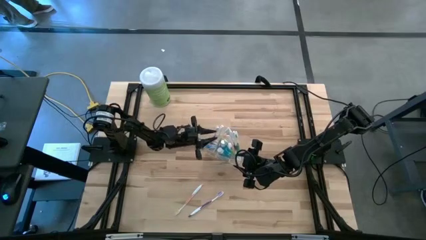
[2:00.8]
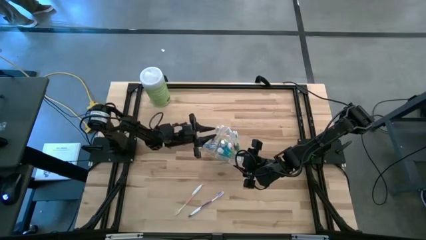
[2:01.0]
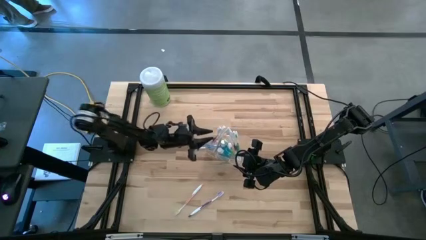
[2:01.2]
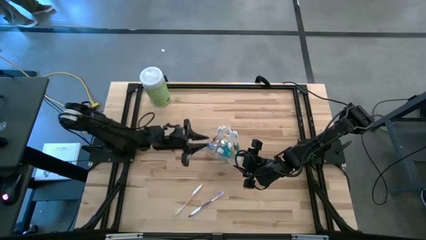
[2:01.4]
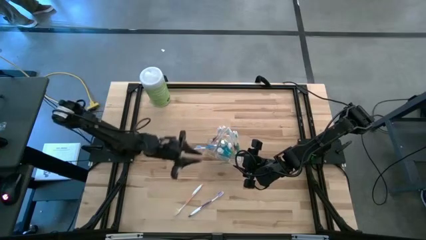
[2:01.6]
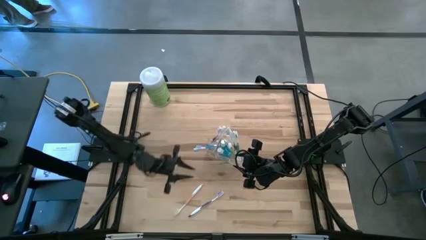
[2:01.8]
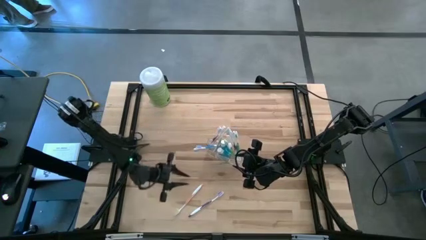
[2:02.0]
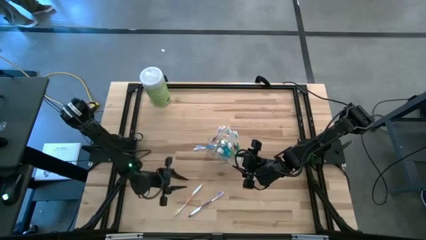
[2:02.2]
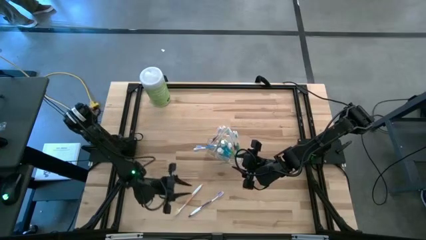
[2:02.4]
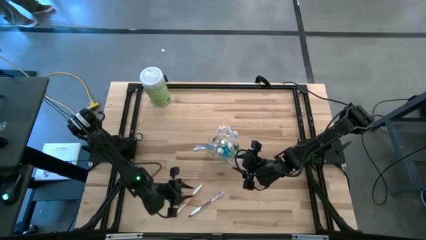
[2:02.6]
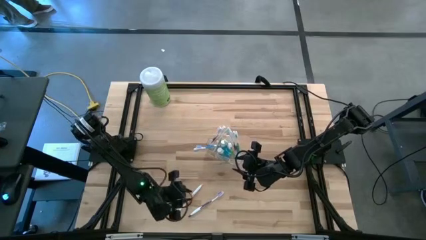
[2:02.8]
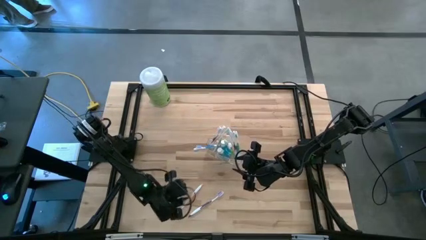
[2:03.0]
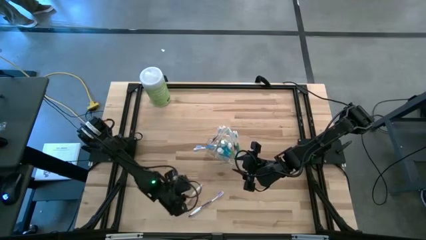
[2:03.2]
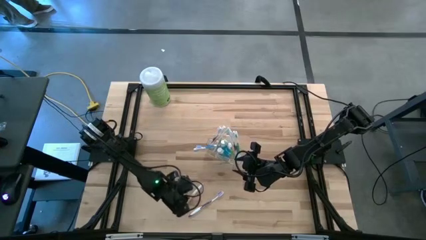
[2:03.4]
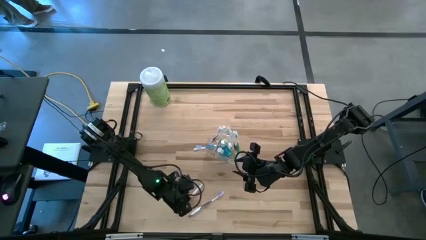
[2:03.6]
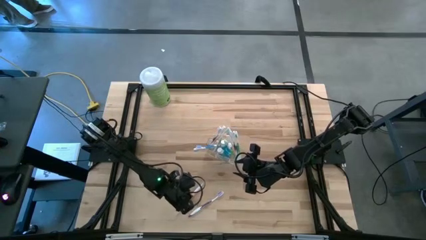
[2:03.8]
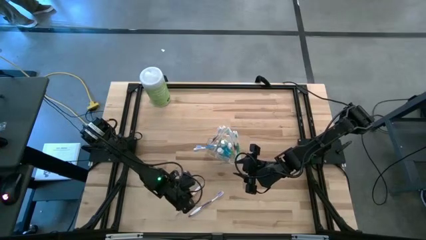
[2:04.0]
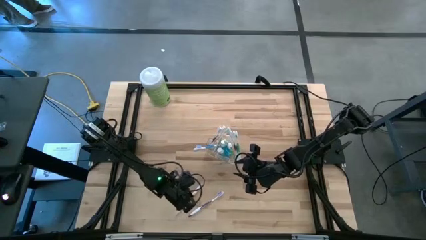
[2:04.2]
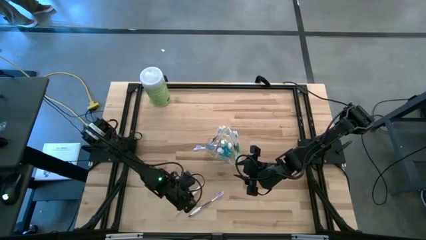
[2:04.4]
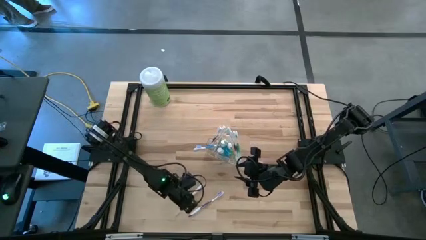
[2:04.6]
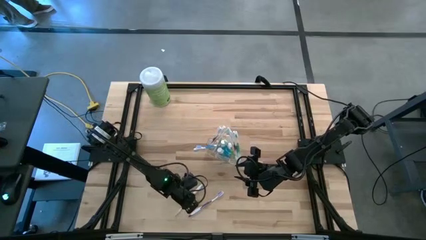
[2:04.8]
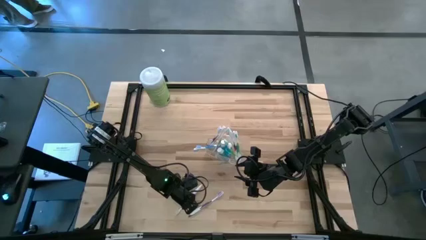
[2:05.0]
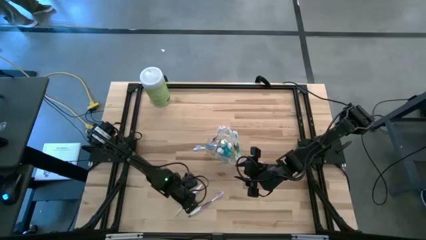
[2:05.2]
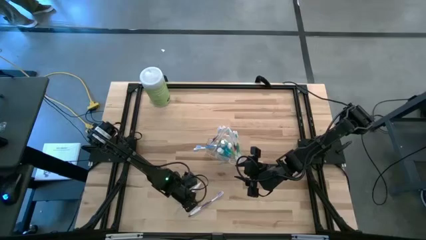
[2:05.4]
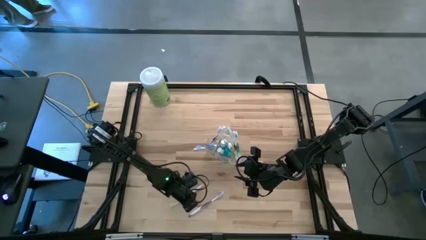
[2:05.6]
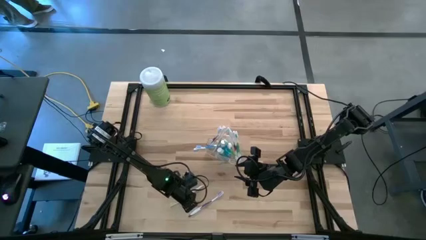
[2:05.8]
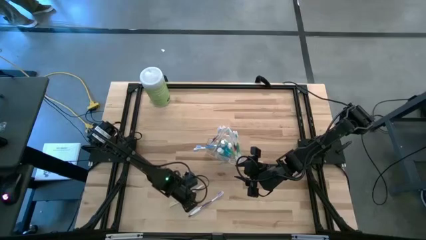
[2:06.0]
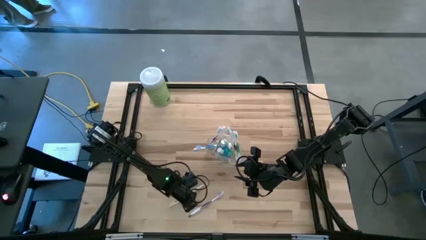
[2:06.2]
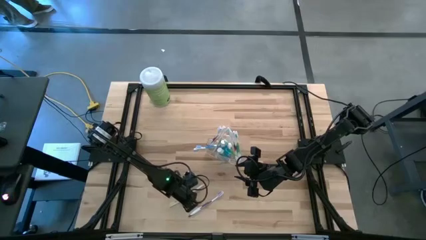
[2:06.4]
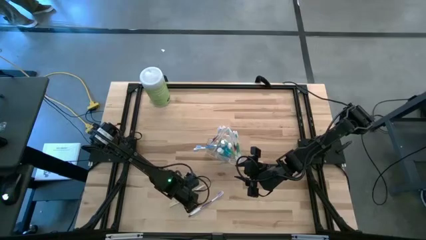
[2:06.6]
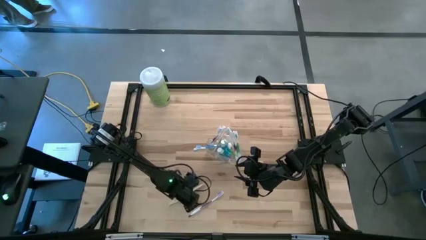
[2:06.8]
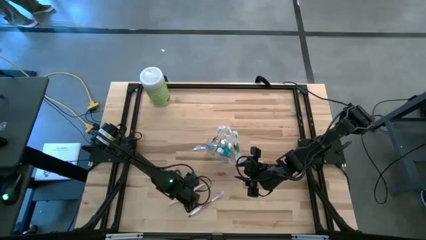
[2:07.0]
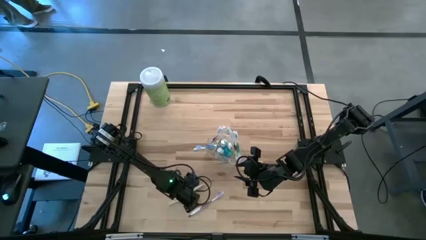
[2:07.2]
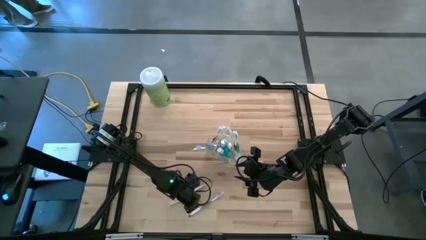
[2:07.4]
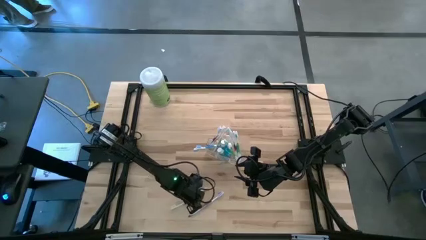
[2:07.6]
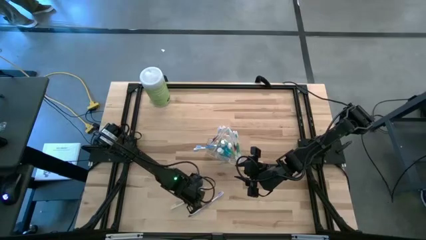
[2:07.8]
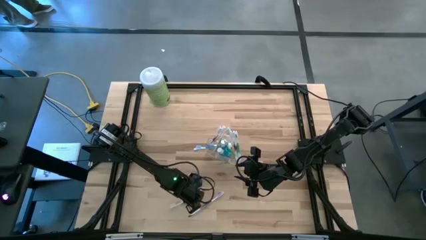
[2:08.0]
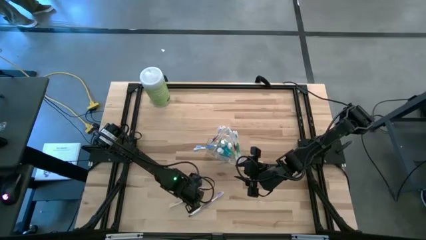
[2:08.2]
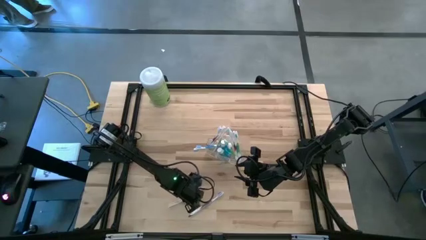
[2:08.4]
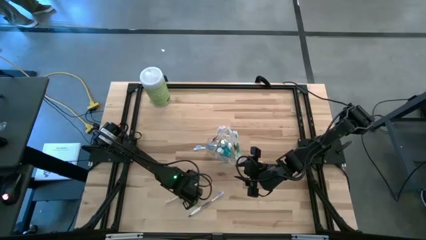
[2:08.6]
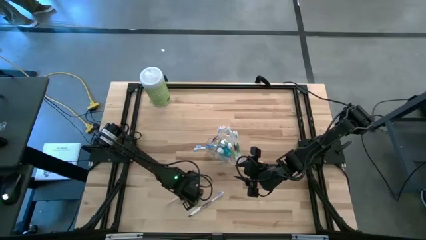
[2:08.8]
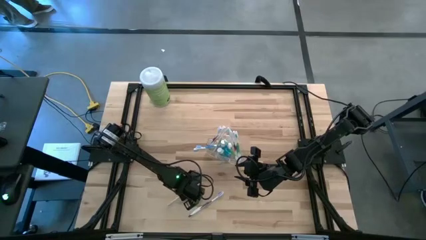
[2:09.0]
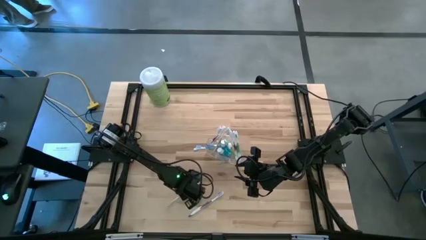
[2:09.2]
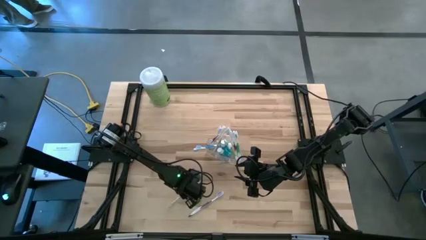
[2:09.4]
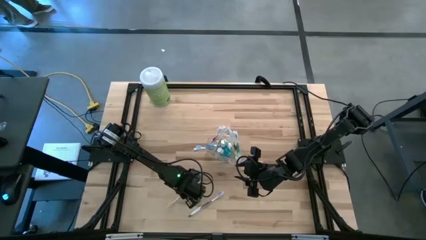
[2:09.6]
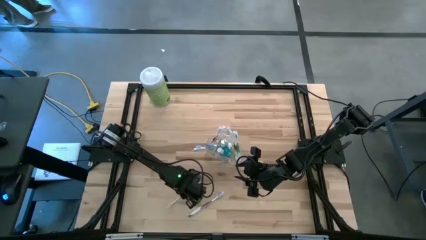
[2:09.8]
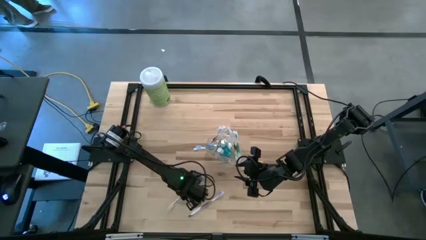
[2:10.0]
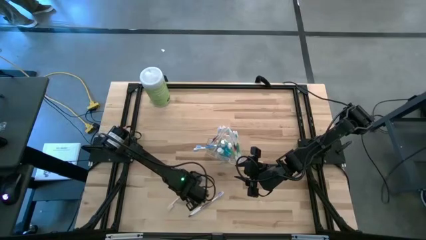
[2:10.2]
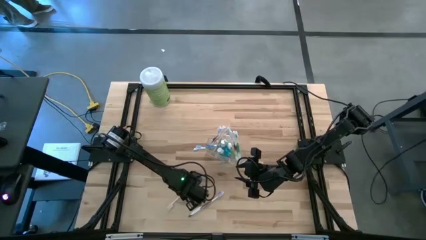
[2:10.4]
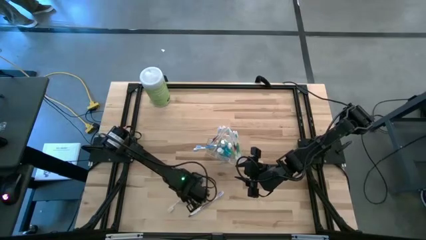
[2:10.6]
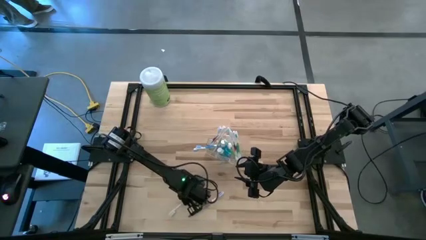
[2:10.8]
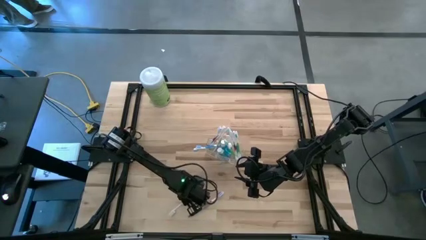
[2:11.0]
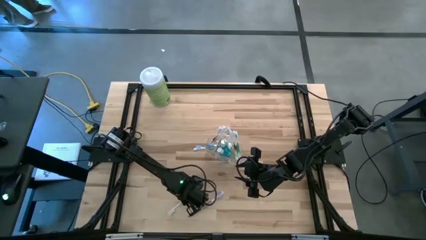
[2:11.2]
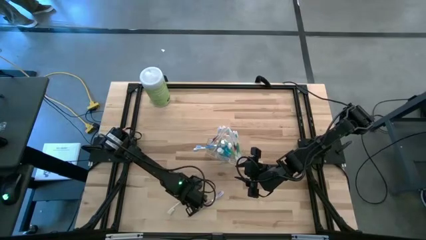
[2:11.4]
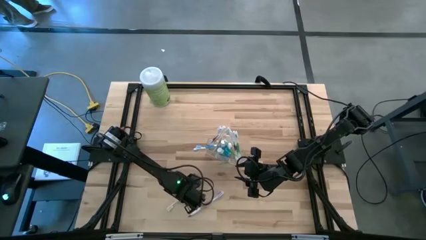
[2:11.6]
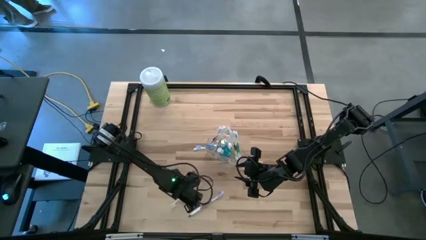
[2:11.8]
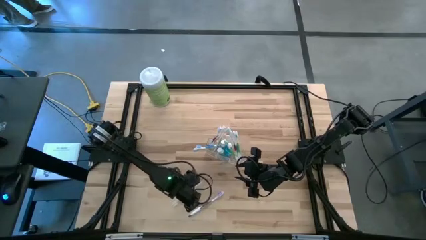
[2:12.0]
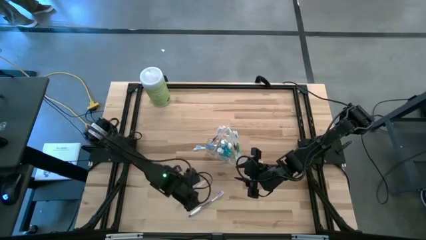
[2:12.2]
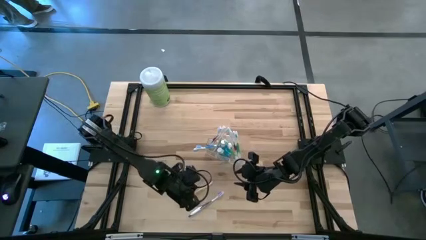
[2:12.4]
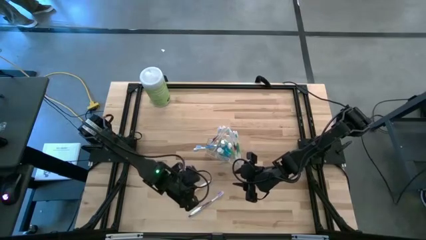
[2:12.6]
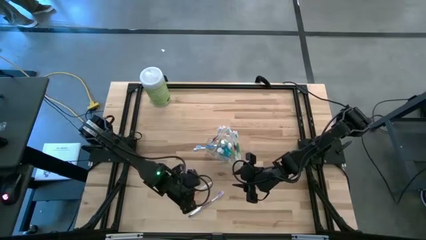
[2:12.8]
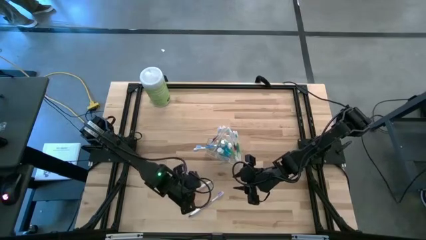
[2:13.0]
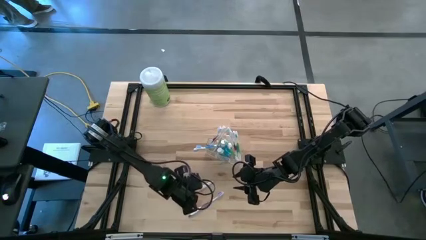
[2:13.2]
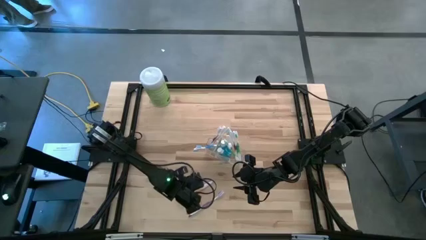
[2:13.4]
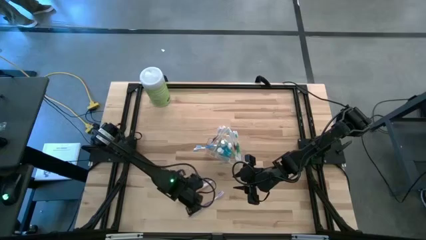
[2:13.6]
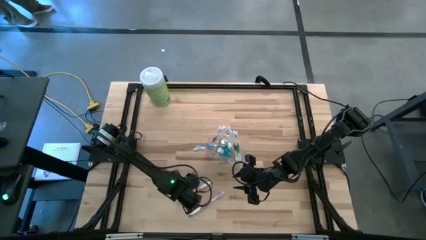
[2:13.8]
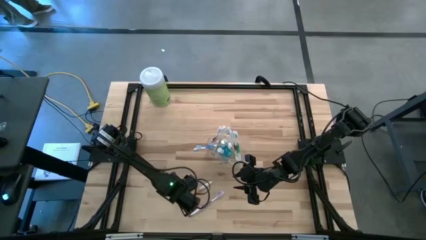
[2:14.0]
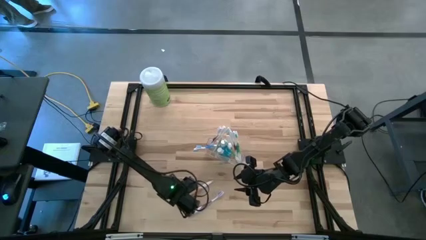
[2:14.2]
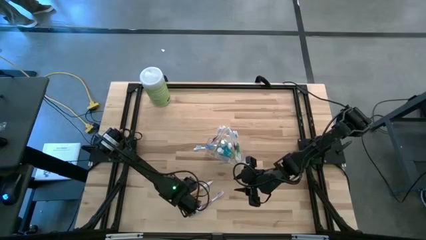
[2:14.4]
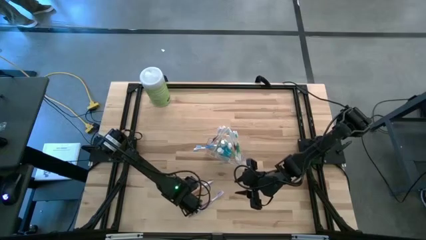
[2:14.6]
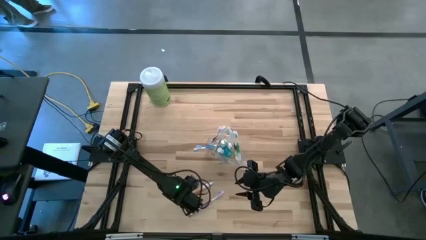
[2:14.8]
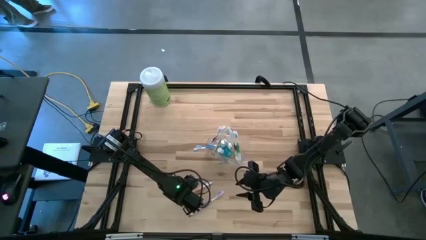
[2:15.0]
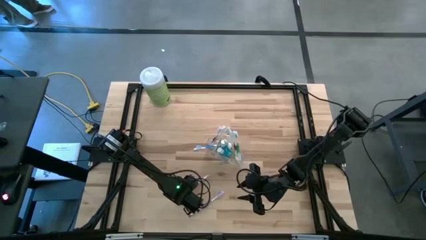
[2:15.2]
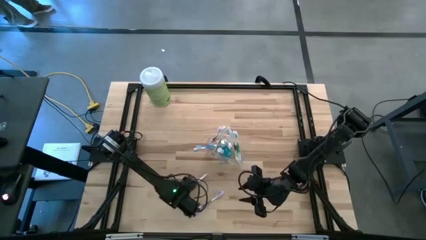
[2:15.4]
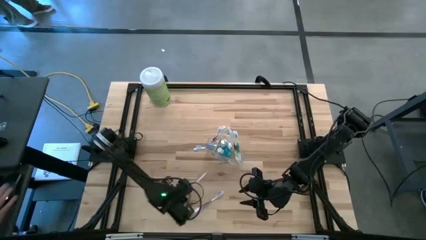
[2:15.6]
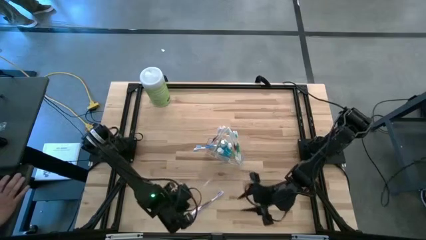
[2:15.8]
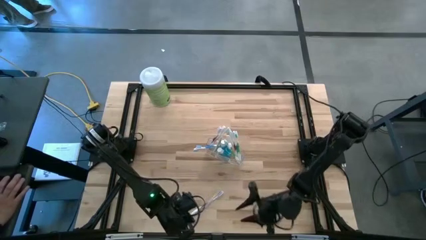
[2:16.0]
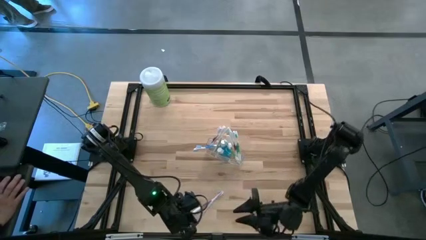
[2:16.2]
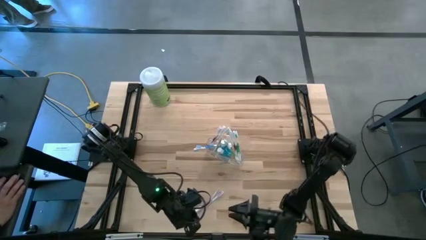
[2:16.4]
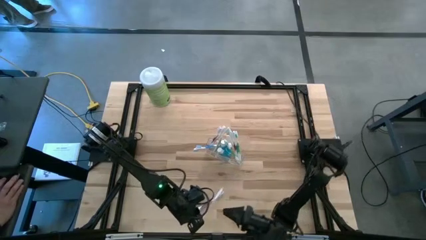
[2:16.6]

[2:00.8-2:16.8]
Task: Pick & Place toothbrushing station
Put the orange toothbrush into the transparent organizer
